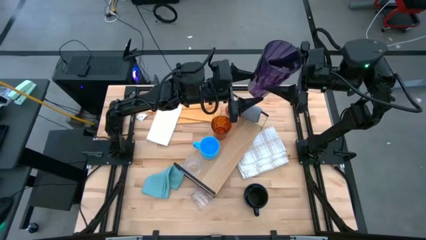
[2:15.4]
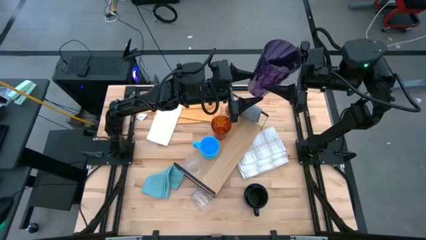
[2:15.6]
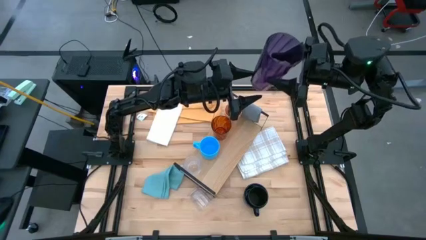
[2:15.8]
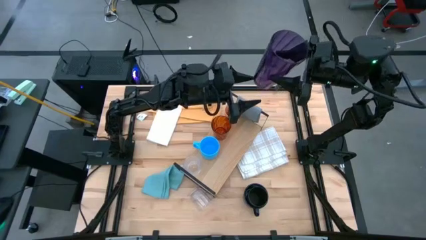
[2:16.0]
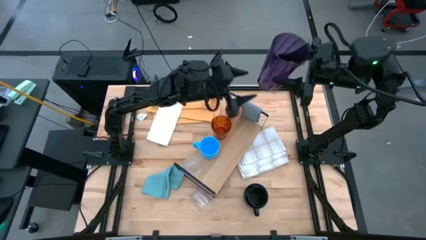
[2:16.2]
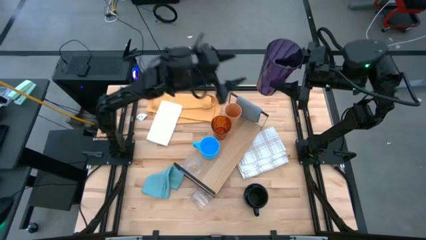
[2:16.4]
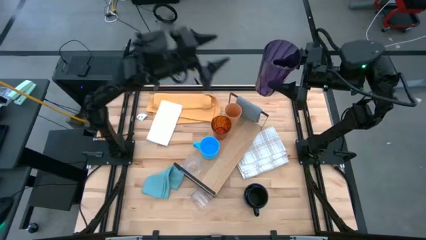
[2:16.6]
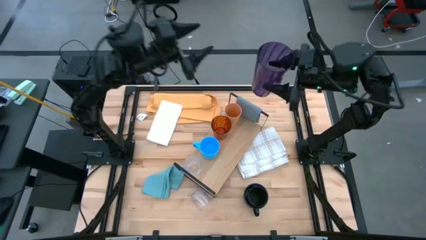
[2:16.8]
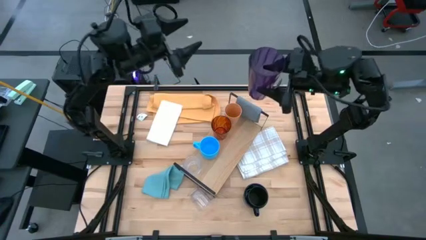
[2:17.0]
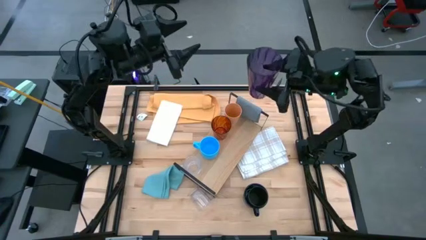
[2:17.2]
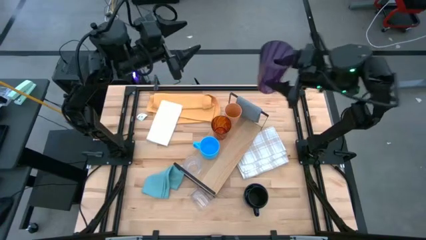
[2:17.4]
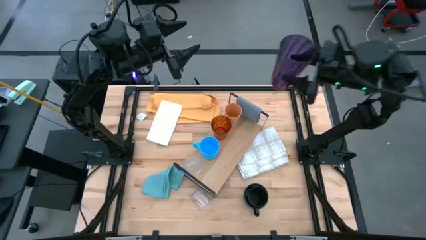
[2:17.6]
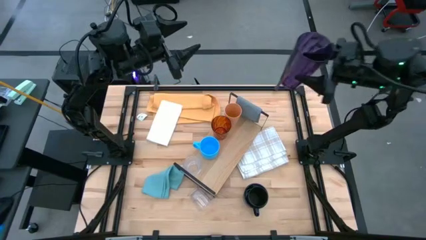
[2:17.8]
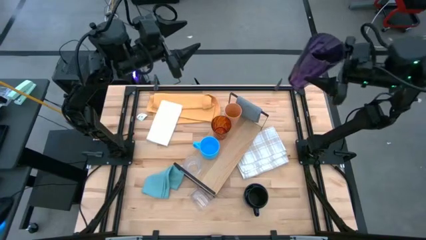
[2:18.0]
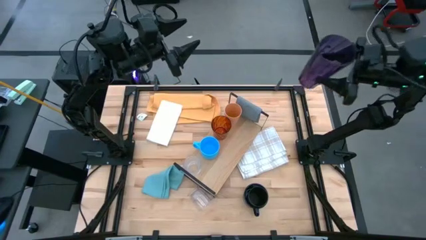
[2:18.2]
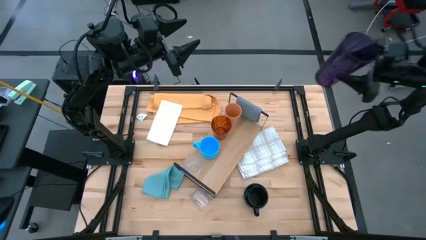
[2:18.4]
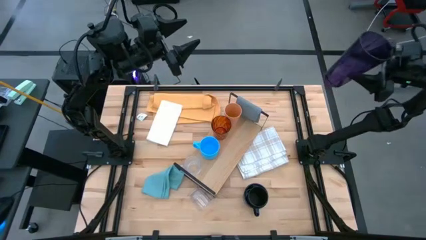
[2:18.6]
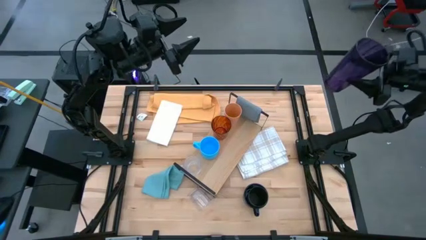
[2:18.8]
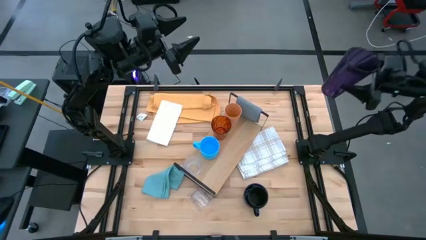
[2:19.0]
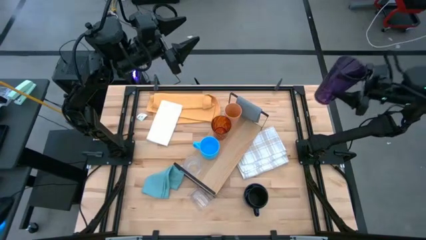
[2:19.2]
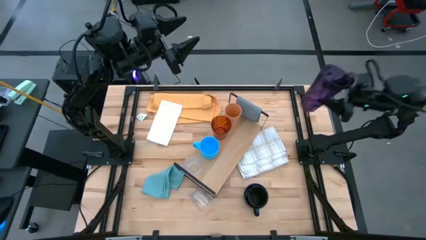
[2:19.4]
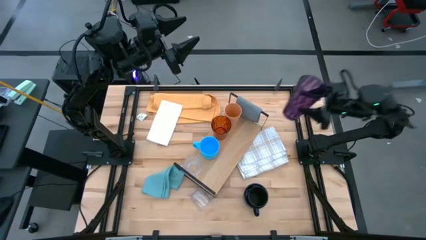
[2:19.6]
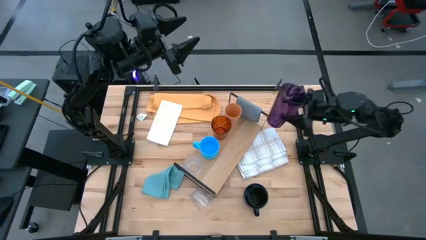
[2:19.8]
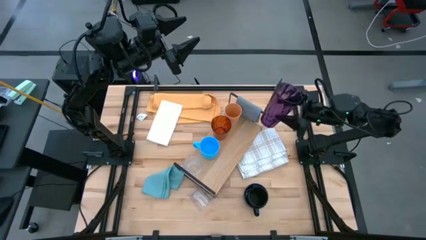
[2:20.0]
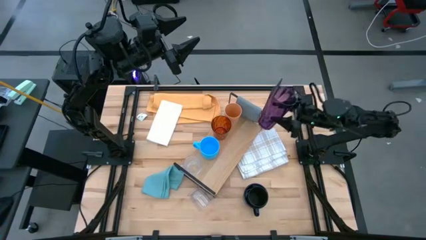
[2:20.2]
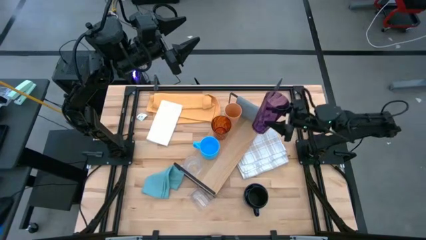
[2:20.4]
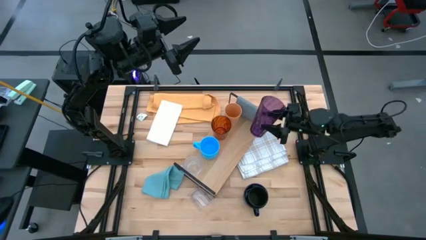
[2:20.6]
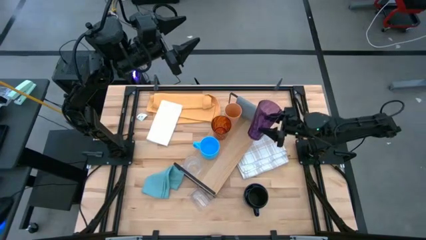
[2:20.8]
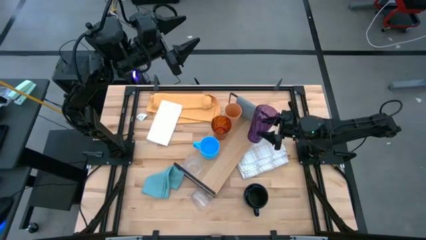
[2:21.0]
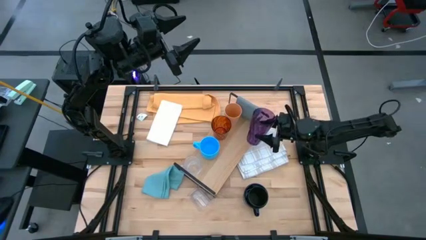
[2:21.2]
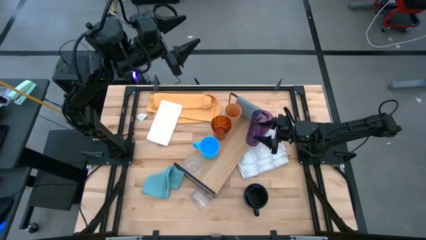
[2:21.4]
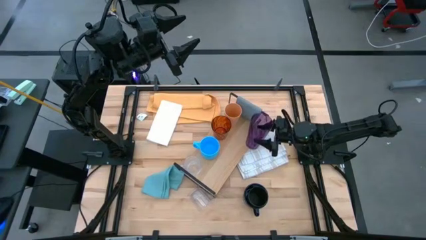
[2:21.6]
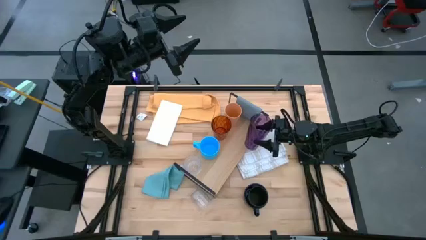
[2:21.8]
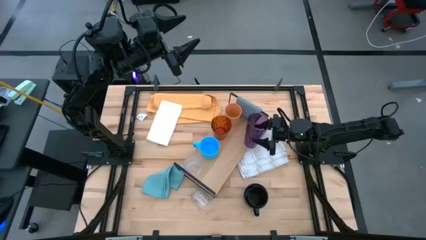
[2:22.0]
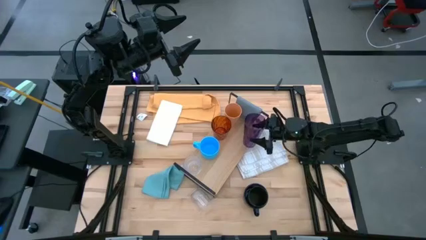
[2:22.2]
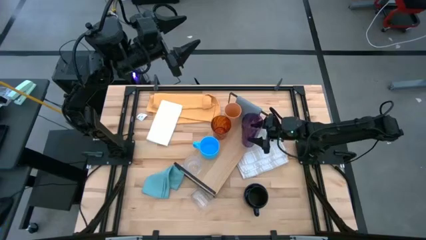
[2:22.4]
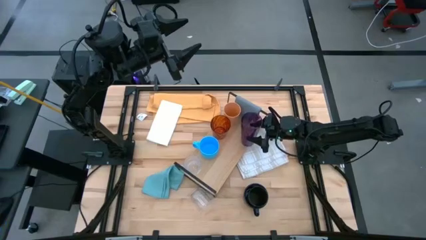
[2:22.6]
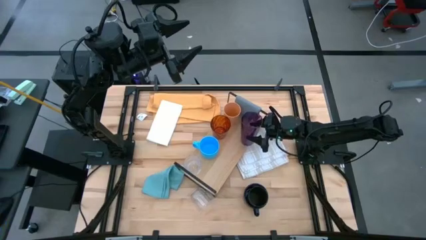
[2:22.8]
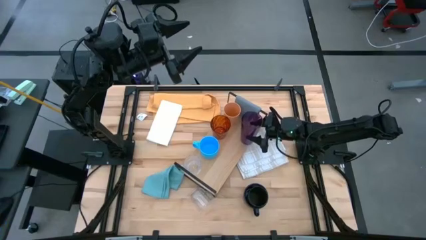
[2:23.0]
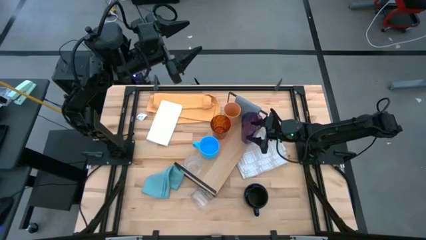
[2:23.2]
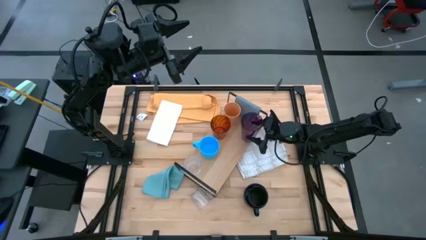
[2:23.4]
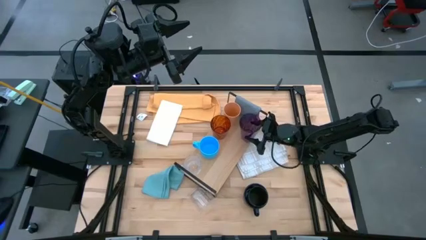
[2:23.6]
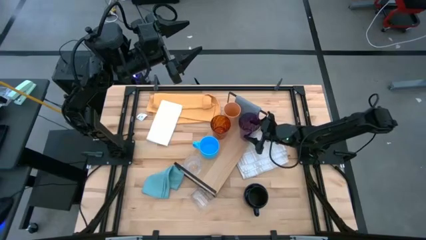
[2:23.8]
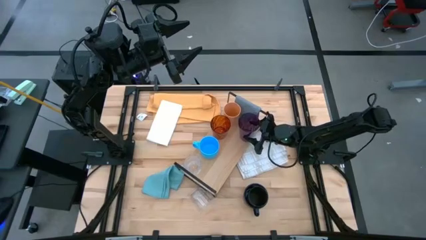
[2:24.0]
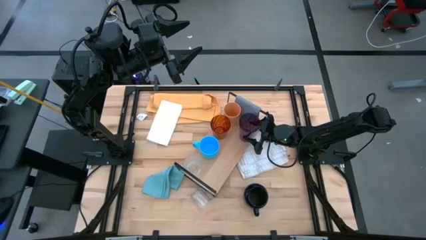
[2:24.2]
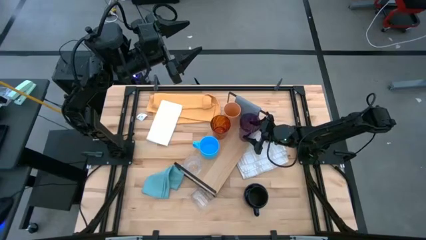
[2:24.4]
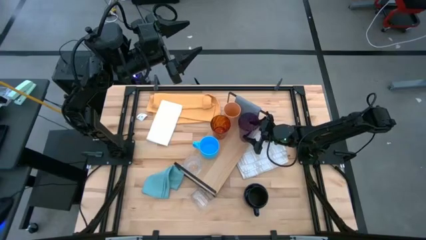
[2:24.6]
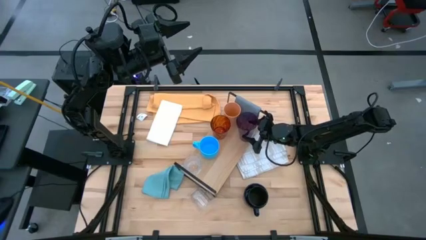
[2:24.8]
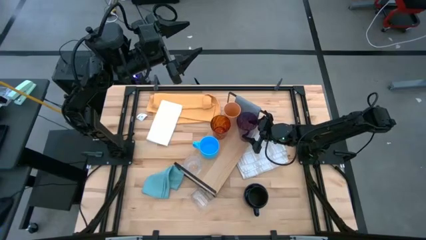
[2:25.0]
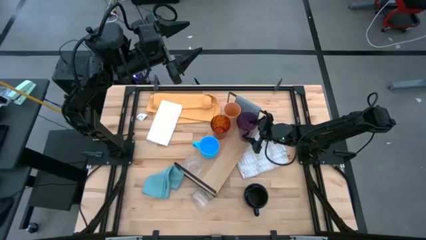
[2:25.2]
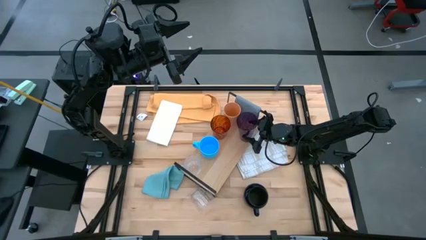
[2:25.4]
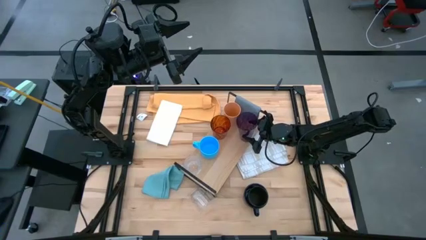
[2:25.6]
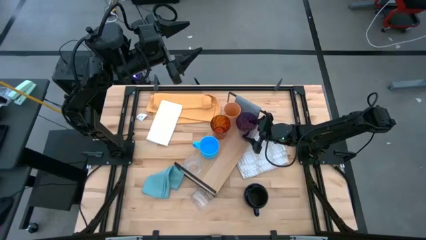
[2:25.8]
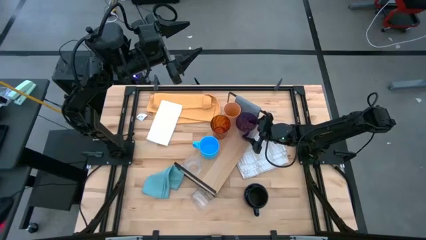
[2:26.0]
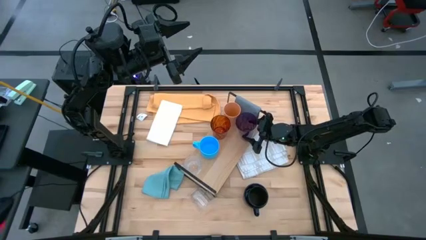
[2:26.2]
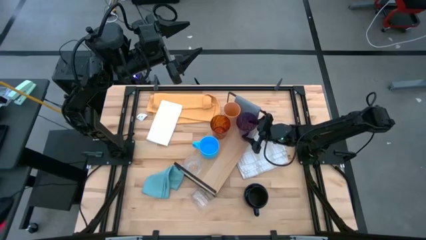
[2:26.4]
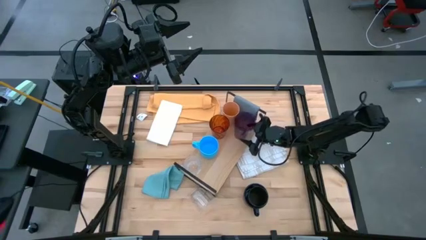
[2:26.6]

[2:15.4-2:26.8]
Task: Stack small to large cups/mugs on shelf
Put the violet glass on the shelf

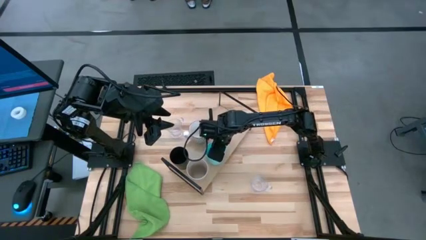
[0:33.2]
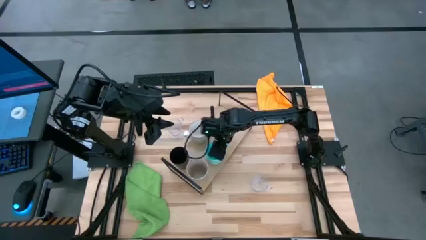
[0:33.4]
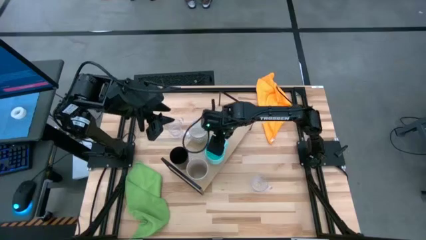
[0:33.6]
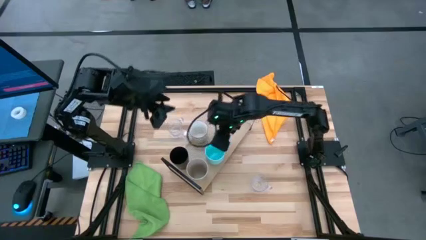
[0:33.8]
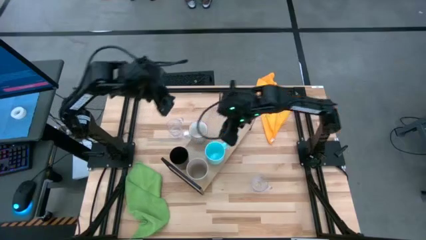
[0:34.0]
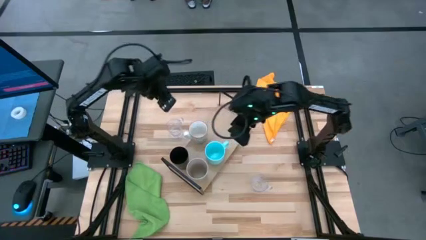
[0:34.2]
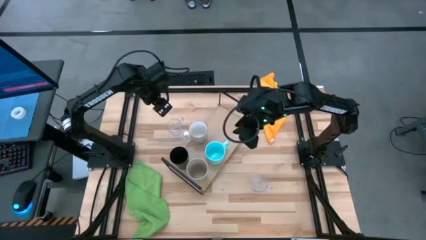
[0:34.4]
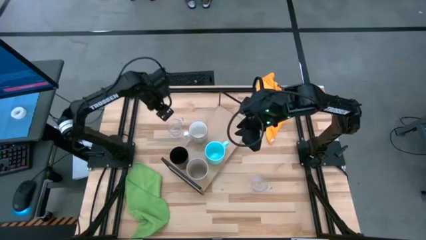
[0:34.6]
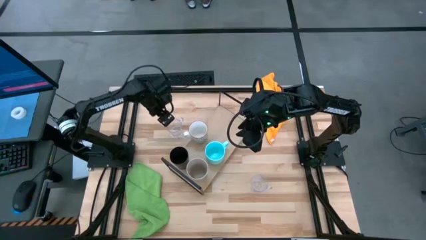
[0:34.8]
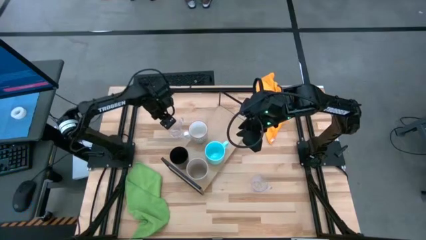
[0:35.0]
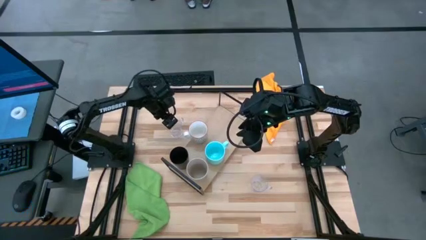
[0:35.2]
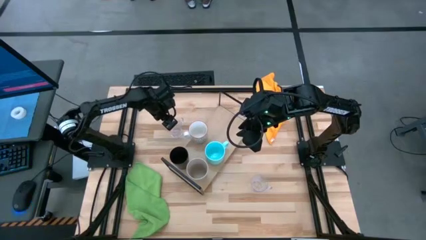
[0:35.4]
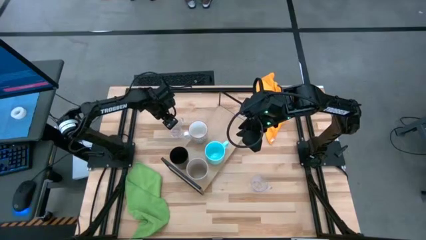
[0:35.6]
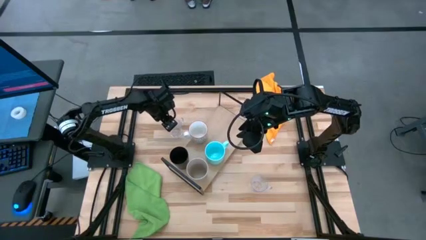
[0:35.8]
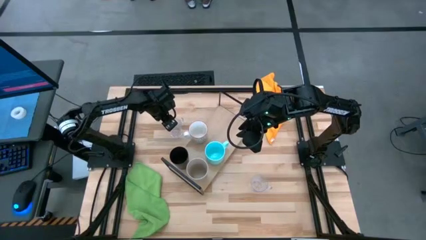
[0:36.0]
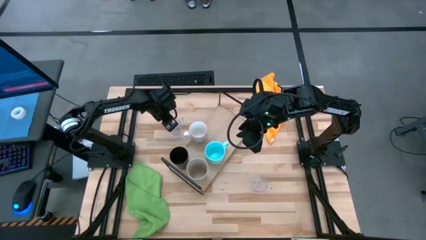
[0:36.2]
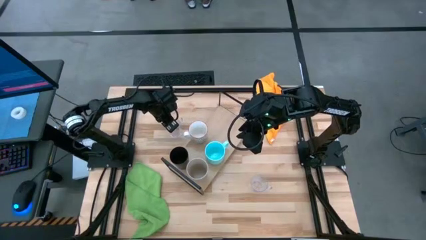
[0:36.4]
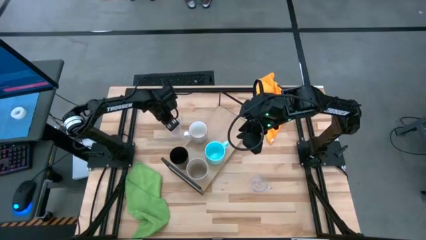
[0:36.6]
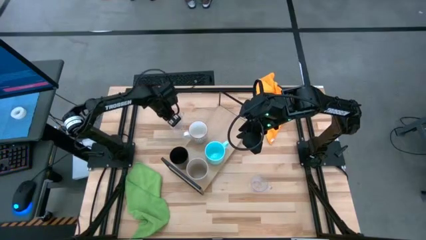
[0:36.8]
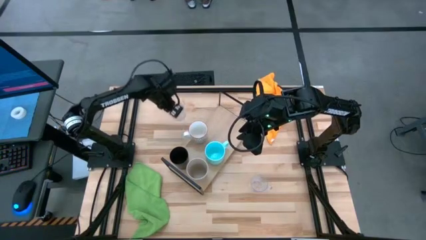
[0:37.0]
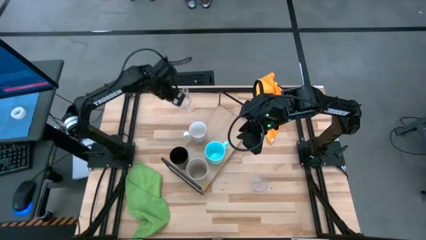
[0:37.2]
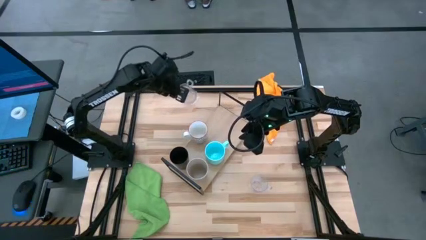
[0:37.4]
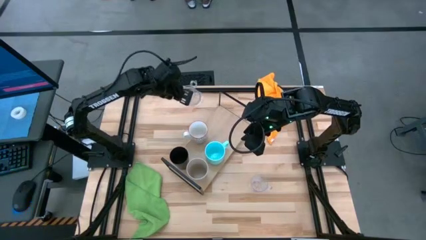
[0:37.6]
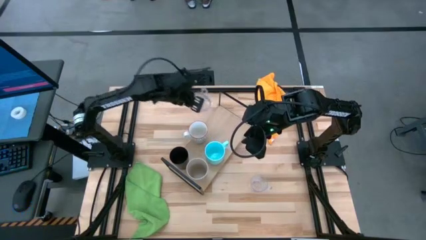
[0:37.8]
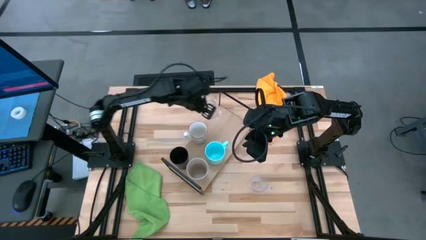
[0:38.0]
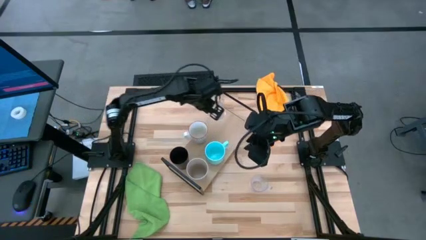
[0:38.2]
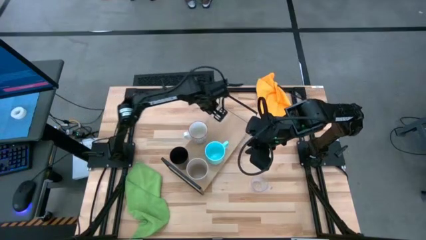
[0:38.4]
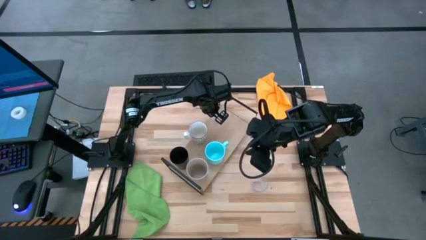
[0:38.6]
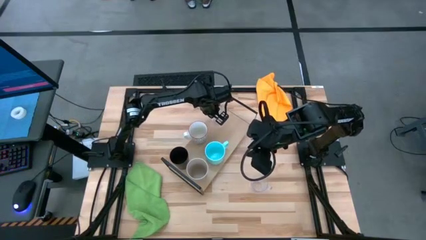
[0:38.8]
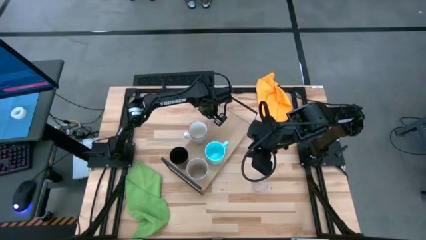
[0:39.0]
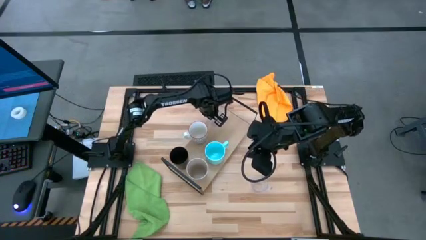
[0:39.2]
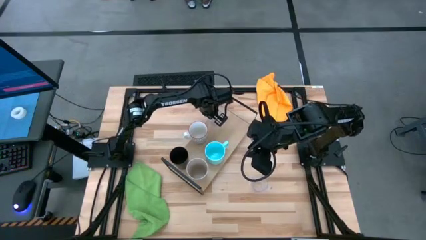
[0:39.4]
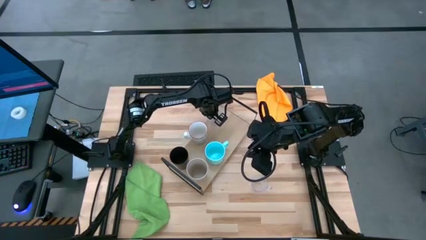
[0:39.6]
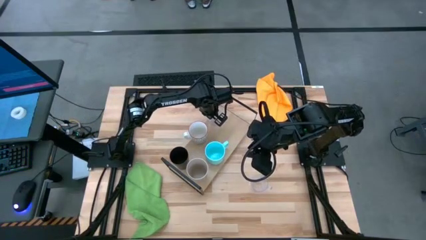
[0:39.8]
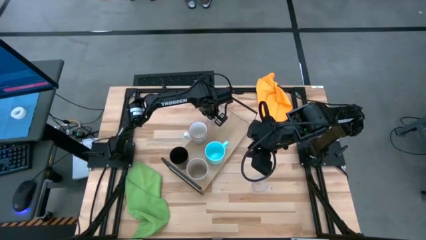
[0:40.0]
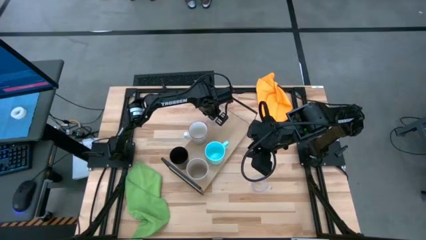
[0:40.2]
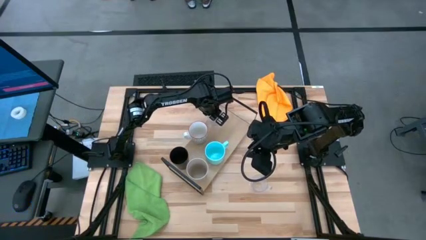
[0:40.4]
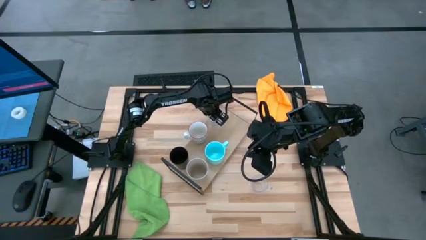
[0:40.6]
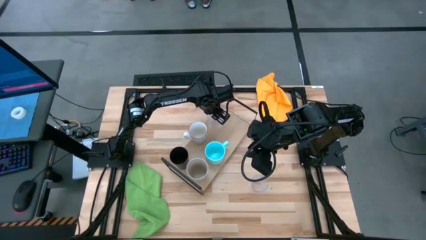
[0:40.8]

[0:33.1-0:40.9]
Task: Stack small to large cups/mugs on shelf
Put the transparent cup on the shelf aligned with the gray cup
